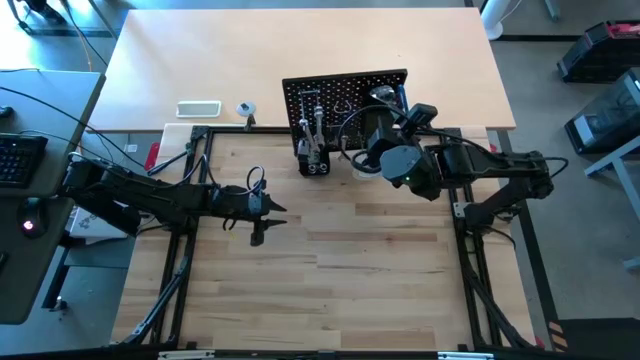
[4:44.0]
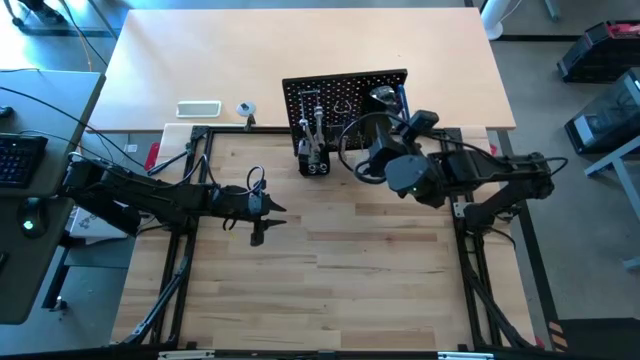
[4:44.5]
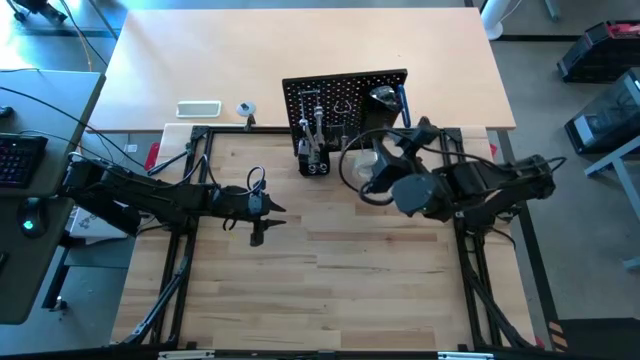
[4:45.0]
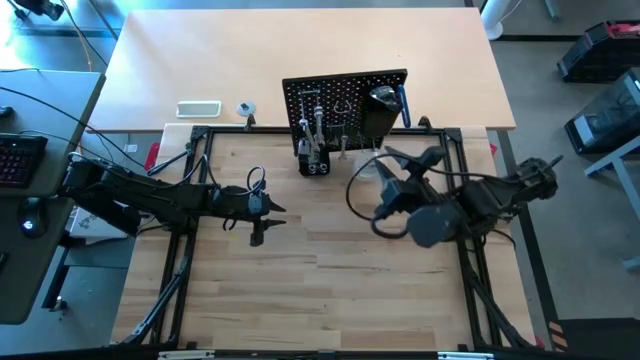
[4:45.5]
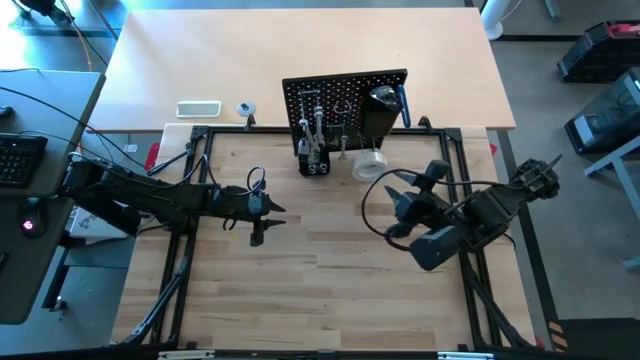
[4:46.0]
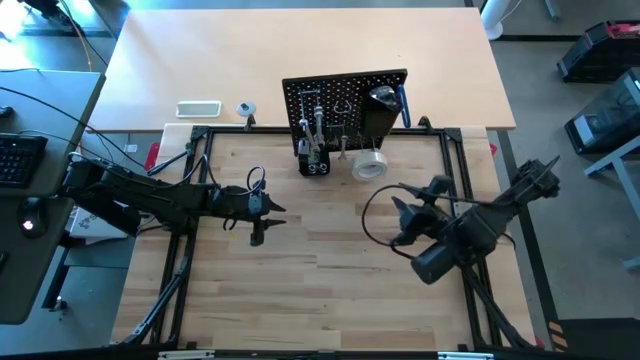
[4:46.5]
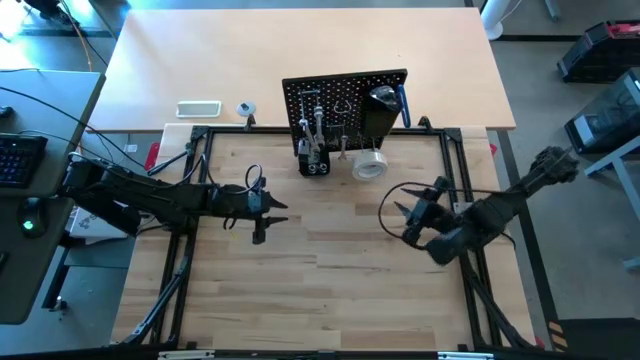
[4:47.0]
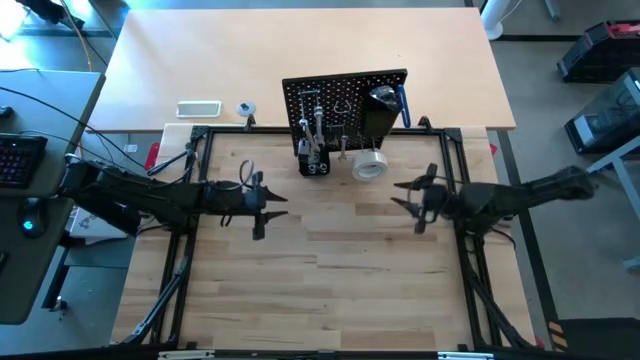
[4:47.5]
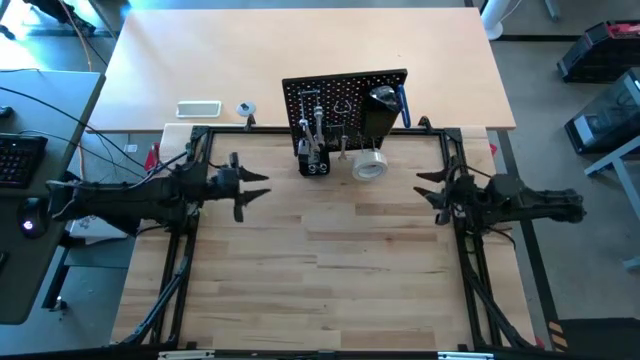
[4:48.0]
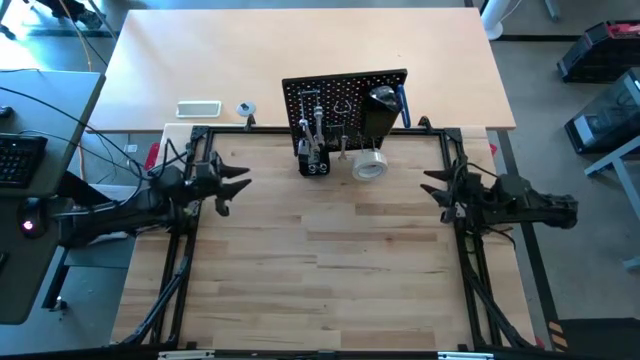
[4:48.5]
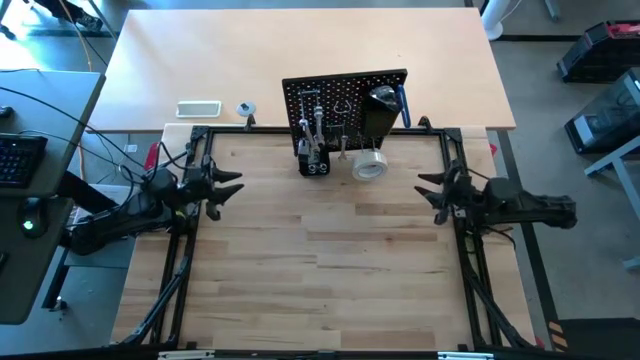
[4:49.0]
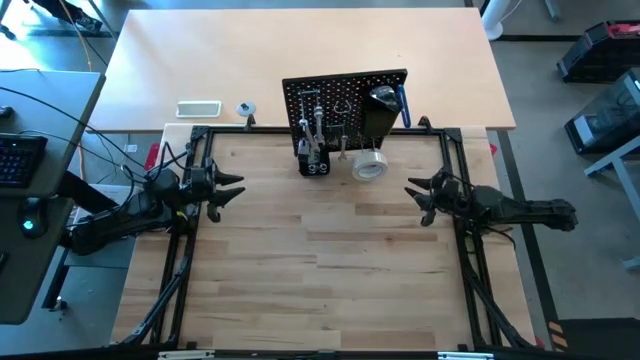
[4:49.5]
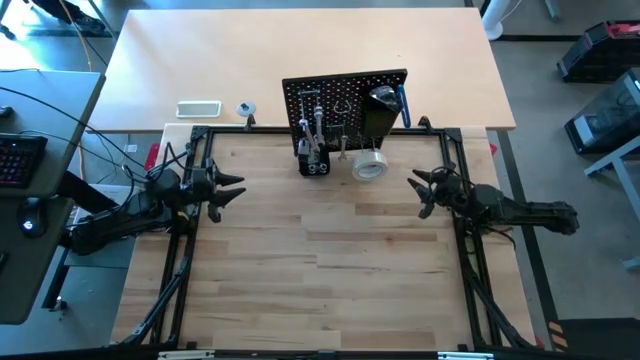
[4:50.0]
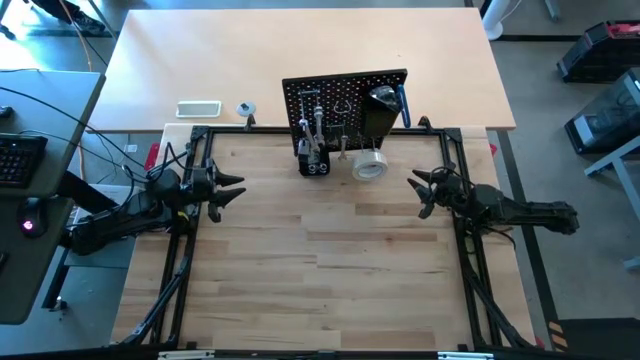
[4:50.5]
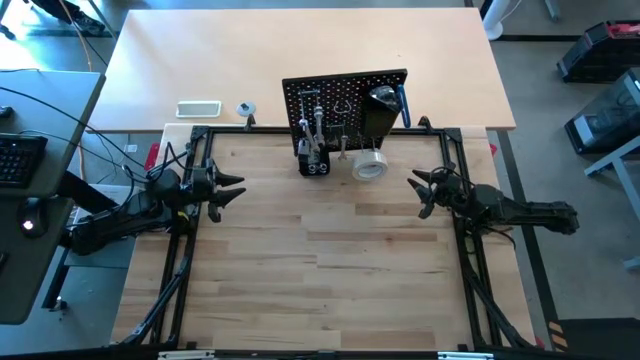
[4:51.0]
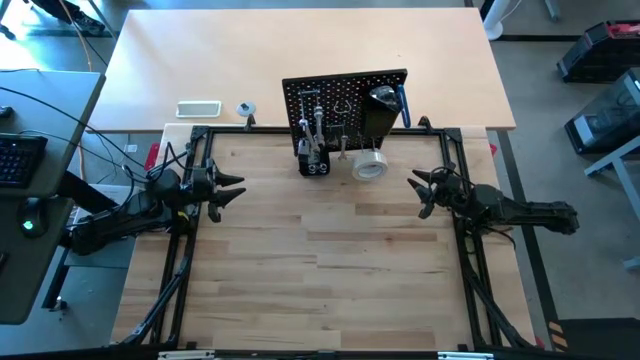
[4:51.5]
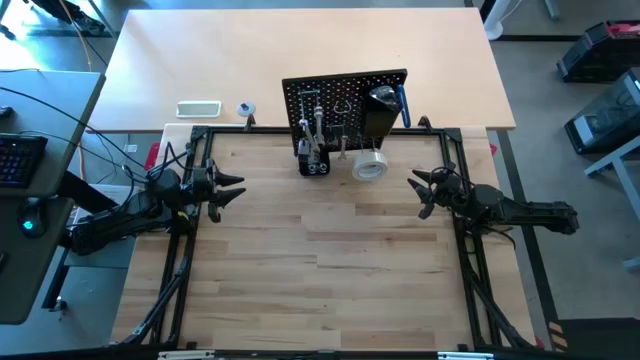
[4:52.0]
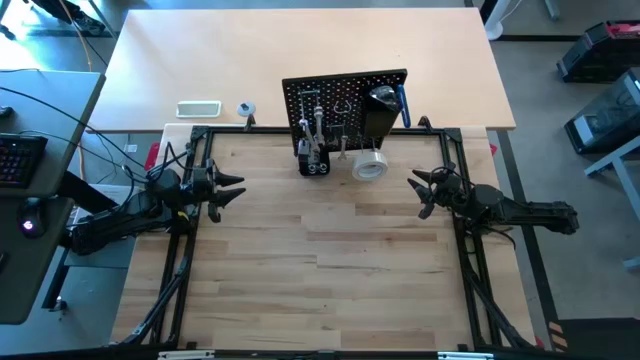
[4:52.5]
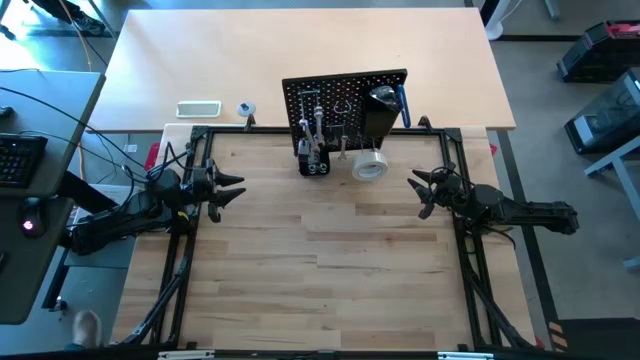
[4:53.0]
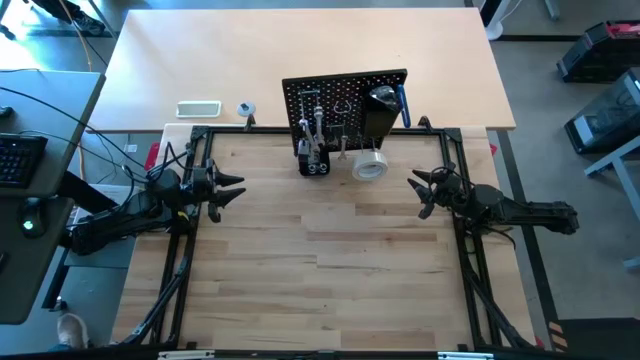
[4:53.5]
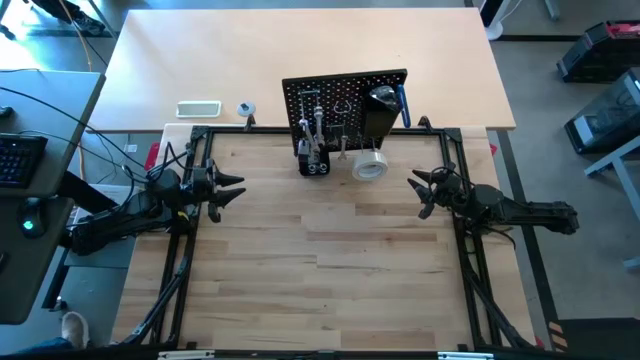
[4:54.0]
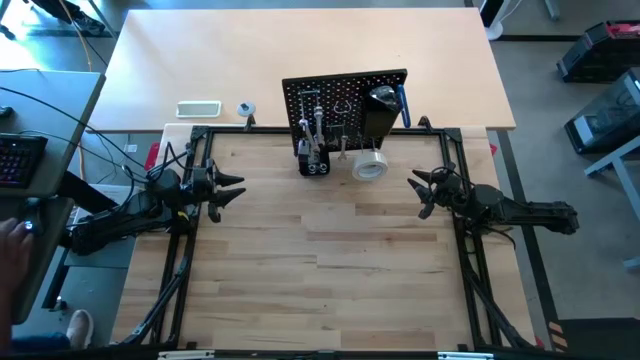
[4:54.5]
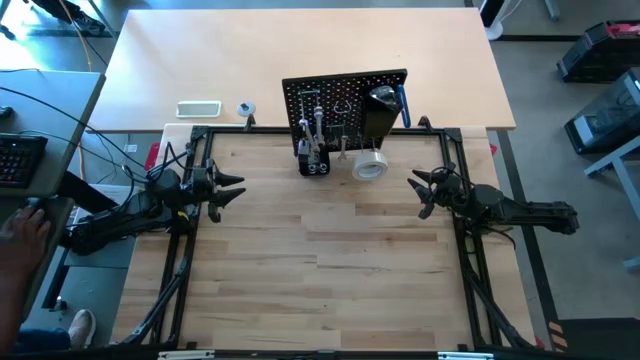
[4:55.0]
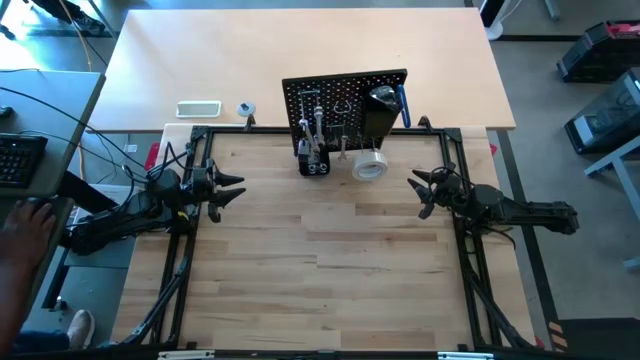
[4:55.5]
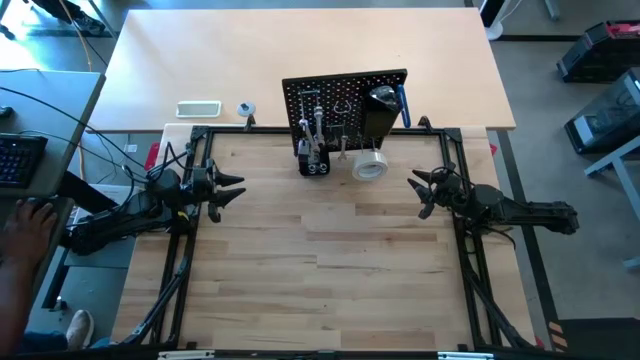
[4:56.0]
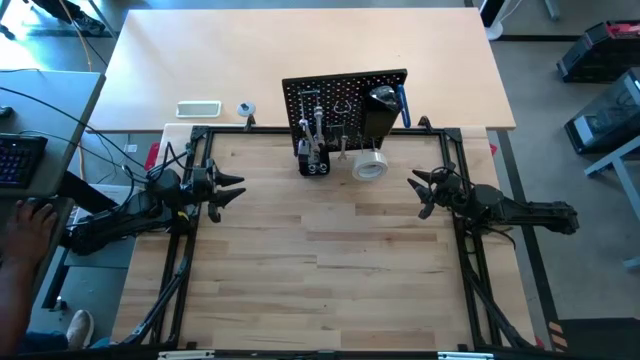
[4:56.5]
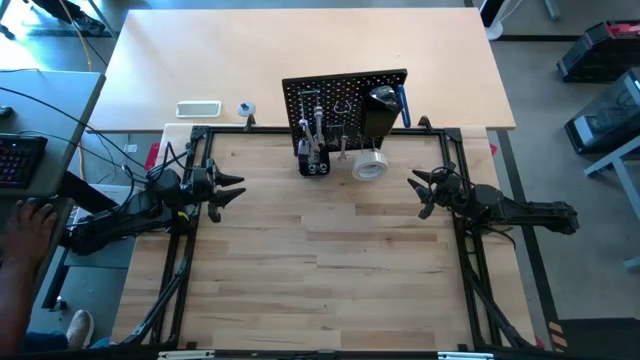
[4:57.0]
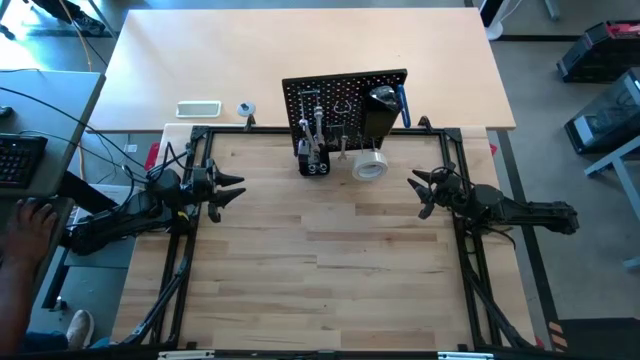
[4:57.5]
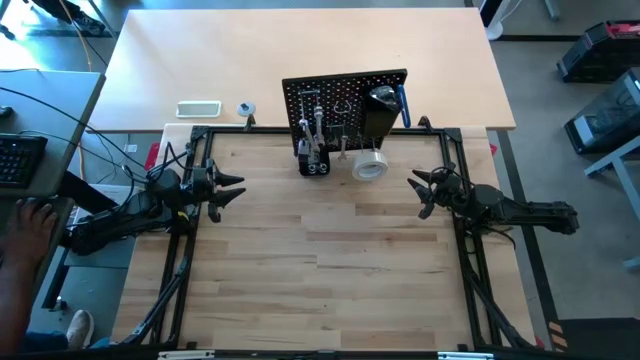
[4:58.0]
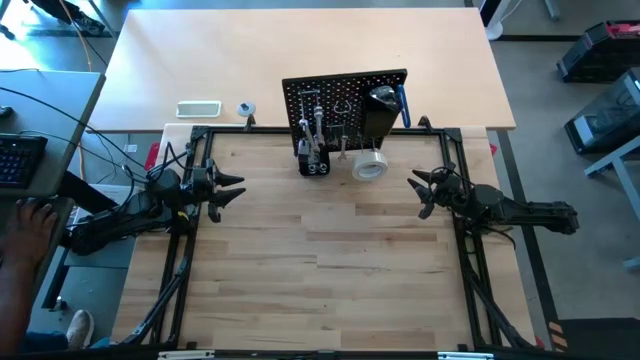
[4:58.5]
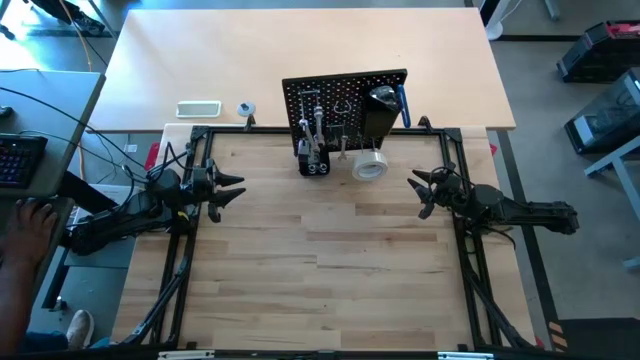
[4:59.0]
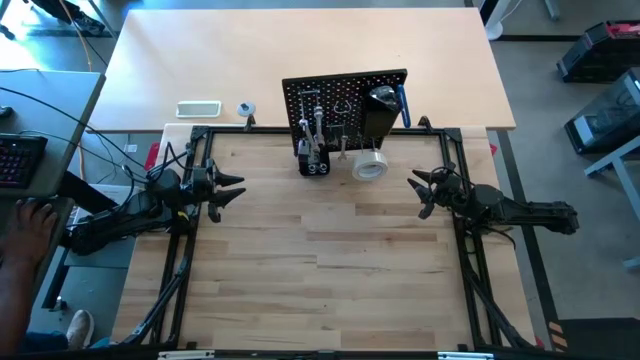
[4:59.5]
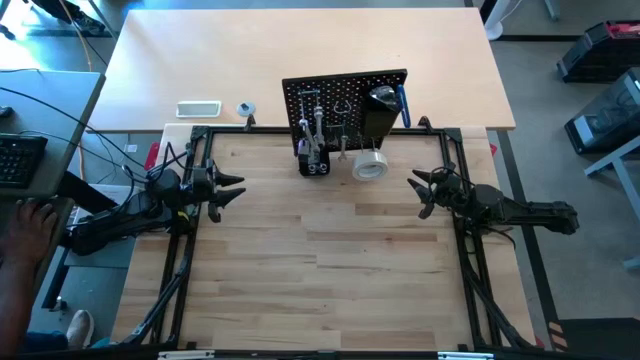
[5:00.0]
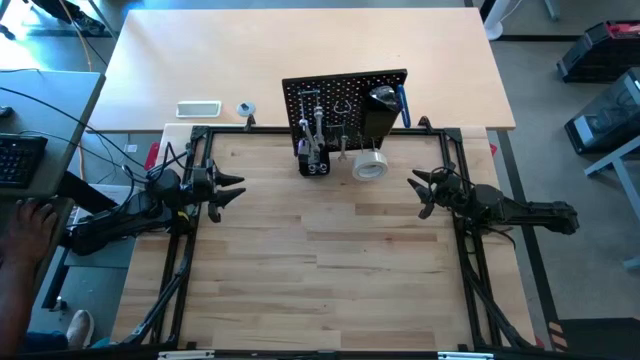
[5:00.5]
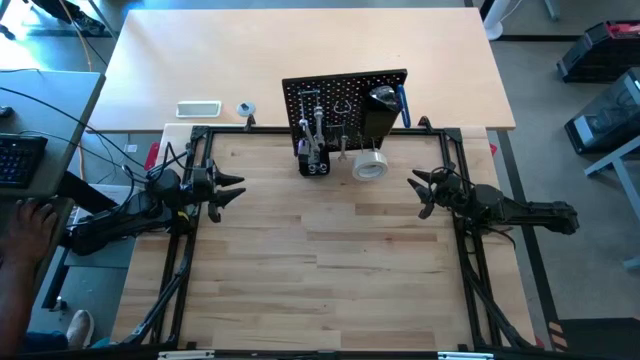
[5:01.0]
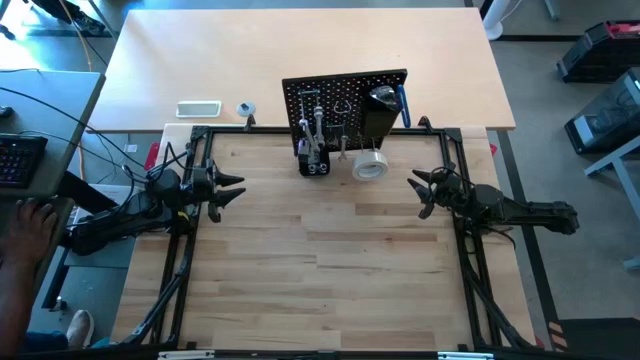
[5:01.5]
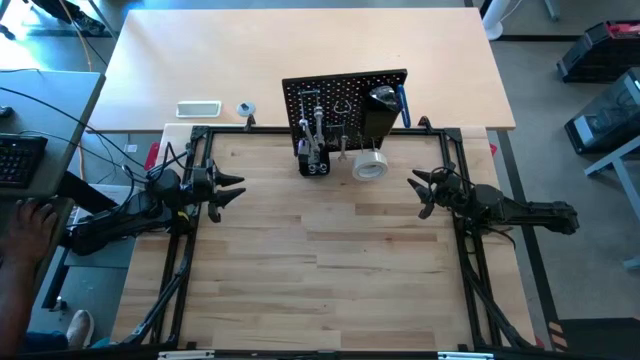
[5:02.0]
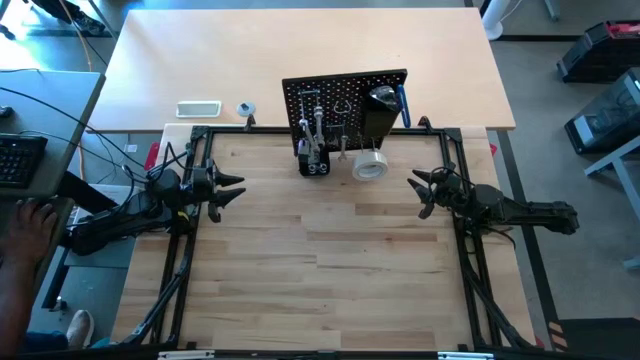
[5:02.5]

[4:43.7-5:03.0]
Task: Hang tools onto peg board
Return to Home Position

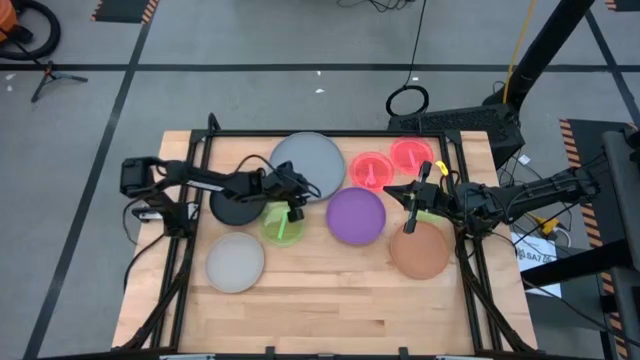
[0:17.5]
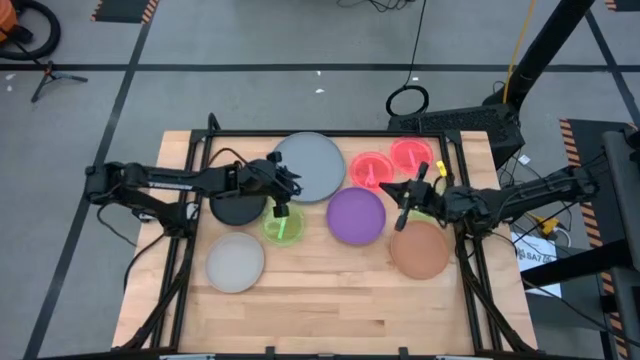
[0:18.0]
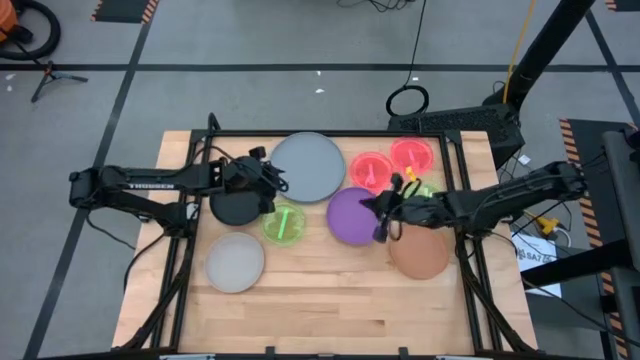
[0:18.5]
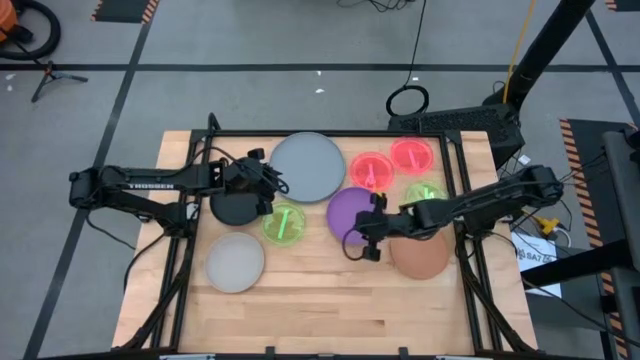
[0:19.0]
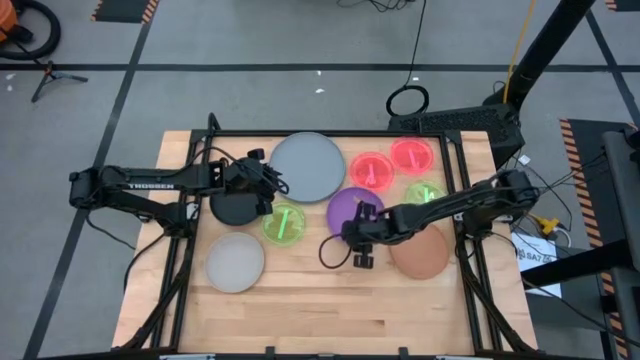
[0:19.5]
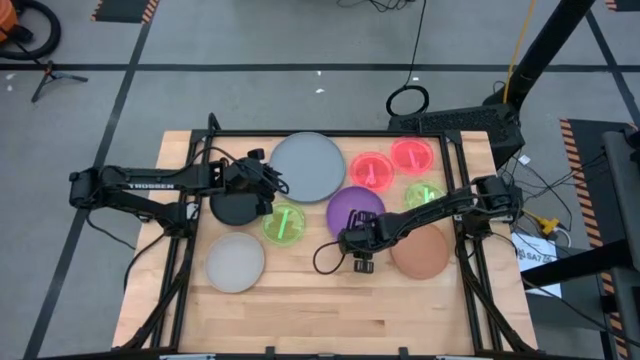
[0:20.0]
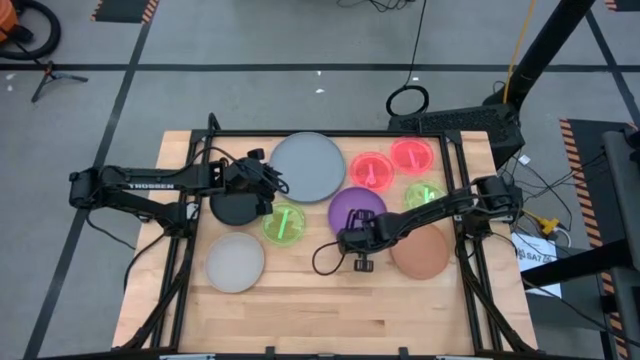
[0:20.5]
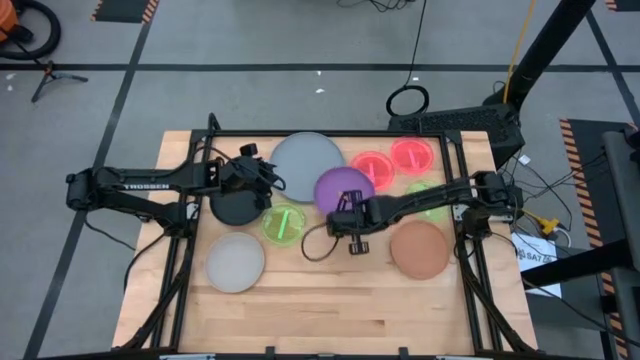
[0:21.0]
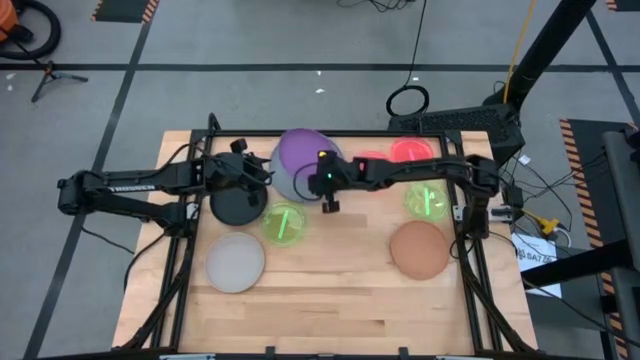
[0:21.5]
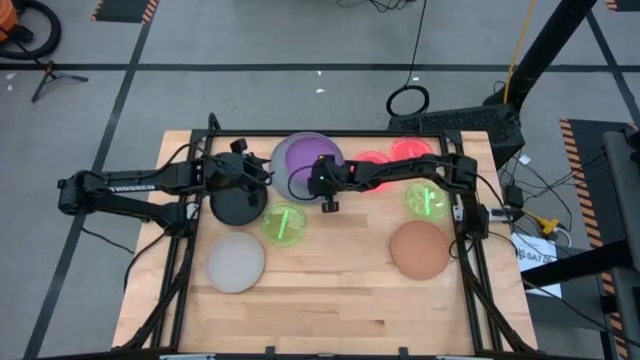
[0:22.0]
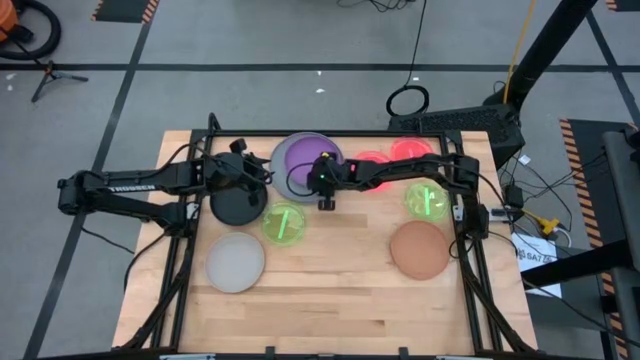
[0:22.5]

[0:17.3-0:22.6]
Task: Stack plastic plates
Stack the purple plate on top of the gray plate
